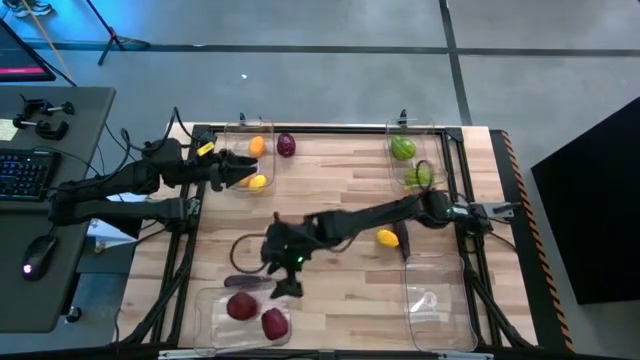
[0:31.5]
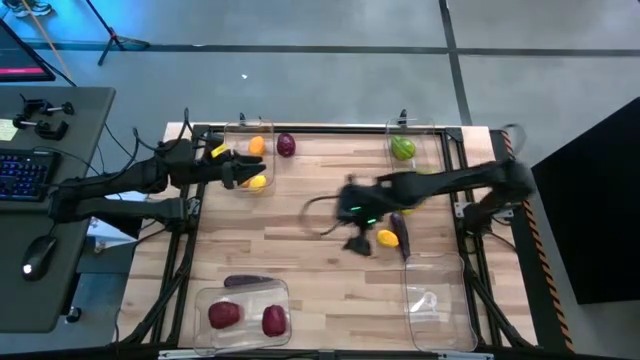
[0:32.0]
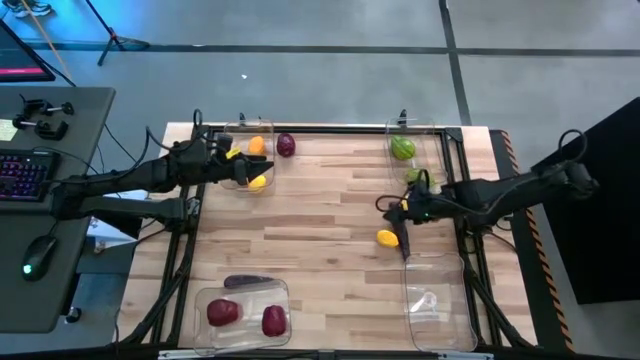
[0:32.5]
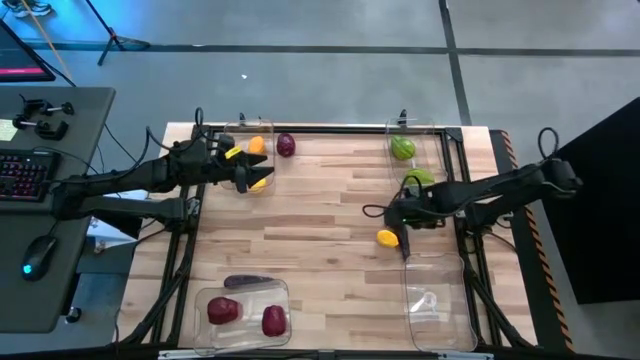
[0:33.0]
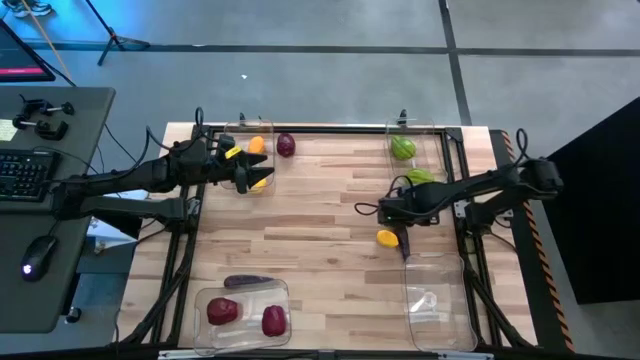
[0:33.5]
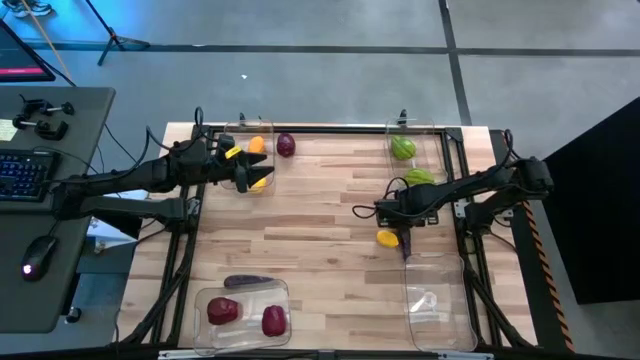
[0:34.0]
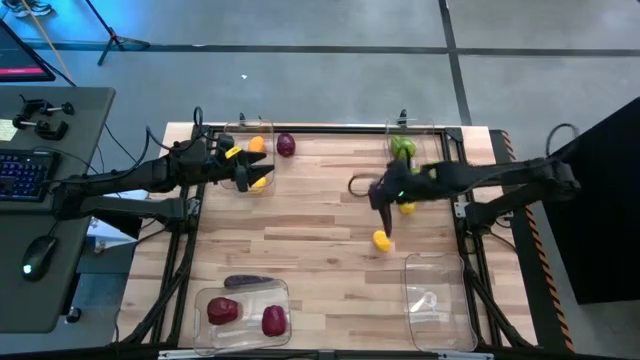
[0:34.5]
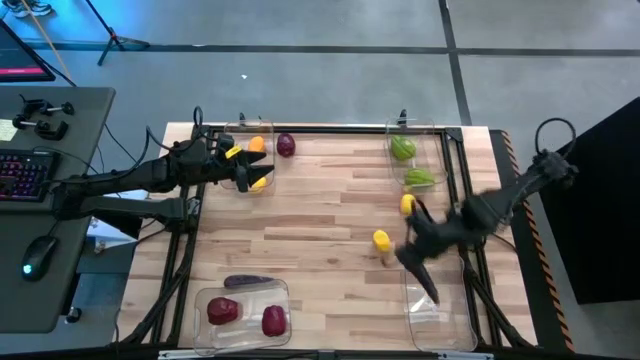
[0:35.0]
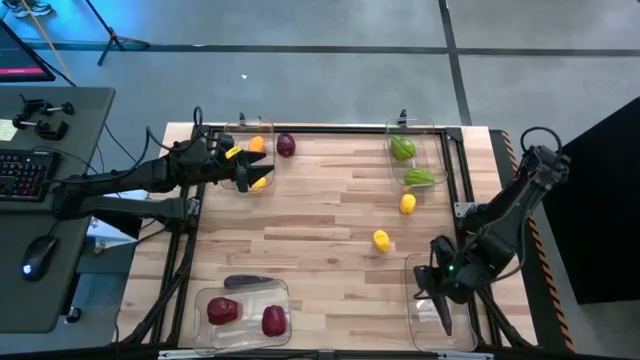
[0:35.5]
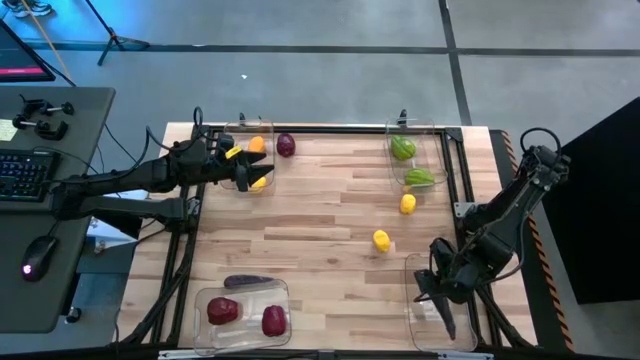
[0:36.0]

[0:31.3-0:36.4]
Task: Sort produce into baskets
Put the purple eggplant into the bottom right transparent bin

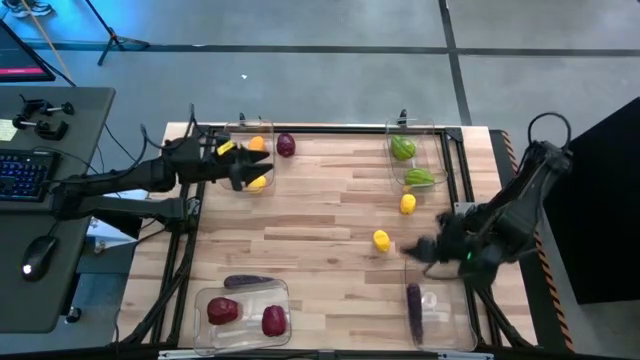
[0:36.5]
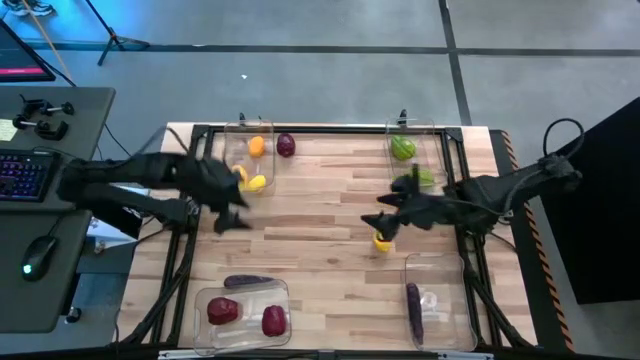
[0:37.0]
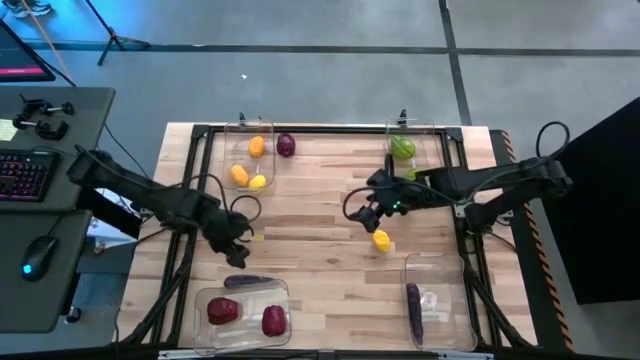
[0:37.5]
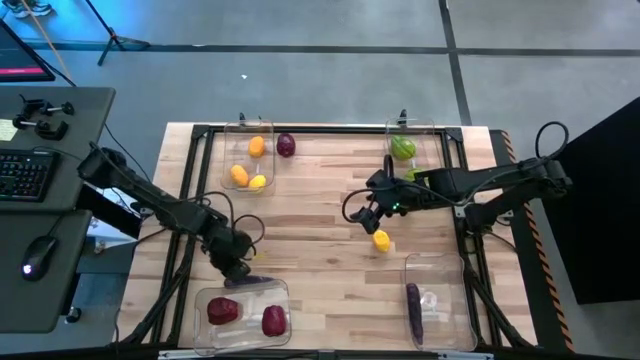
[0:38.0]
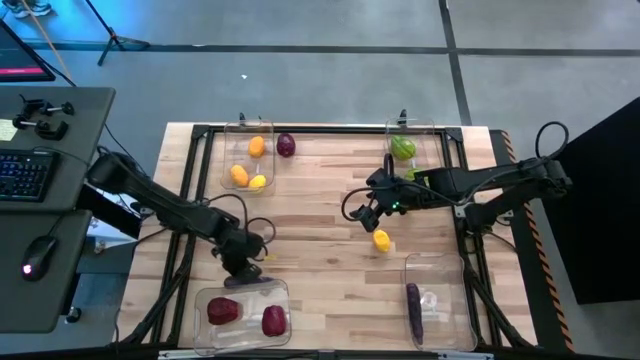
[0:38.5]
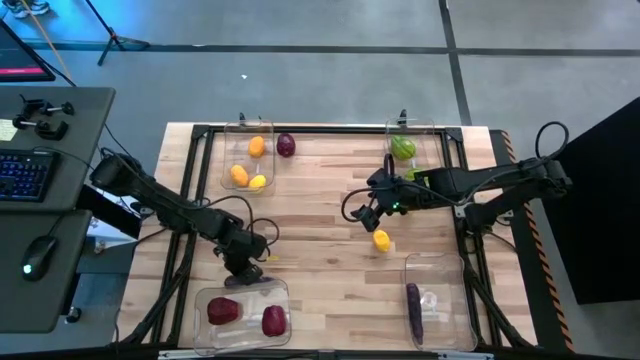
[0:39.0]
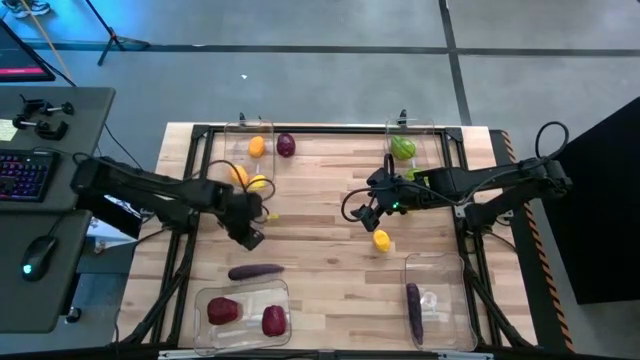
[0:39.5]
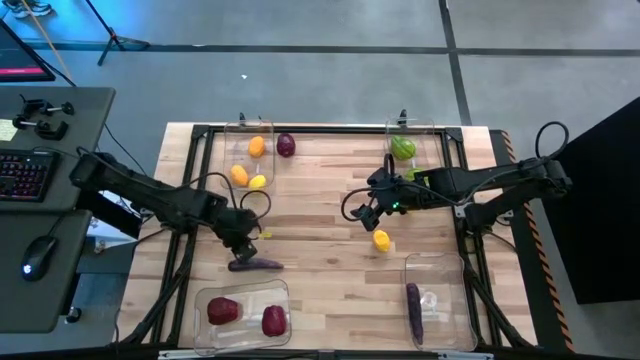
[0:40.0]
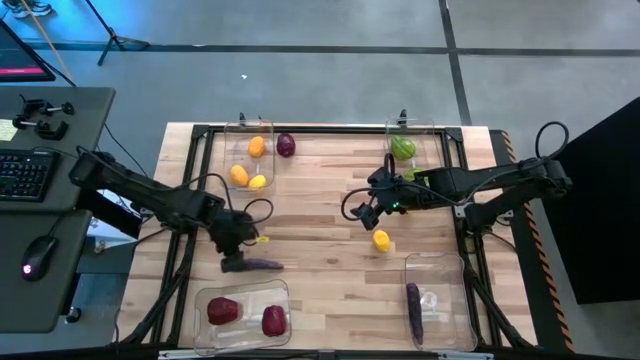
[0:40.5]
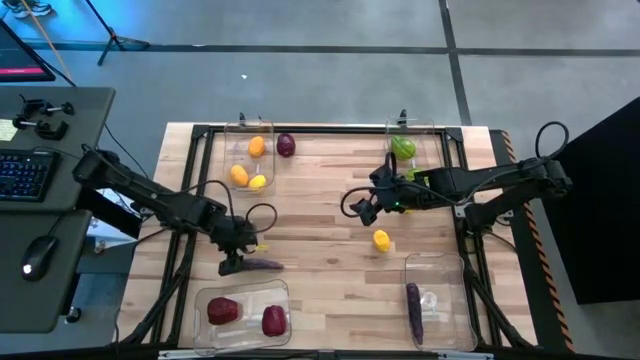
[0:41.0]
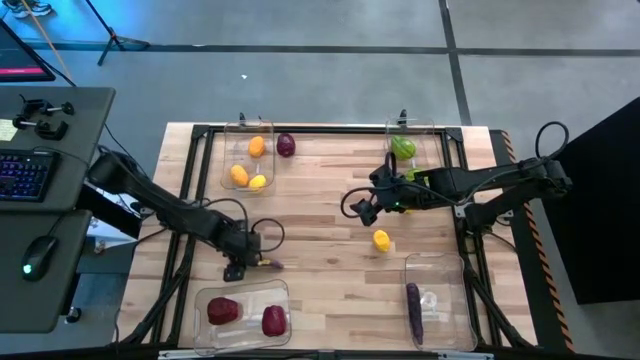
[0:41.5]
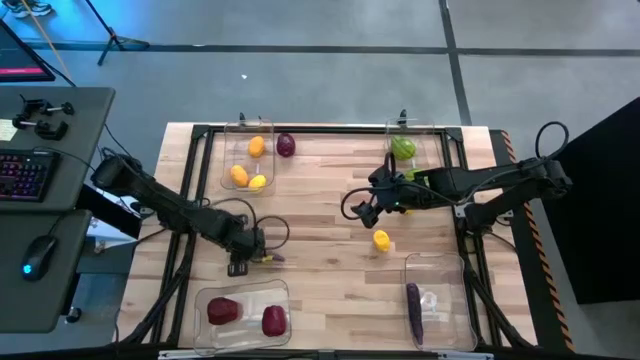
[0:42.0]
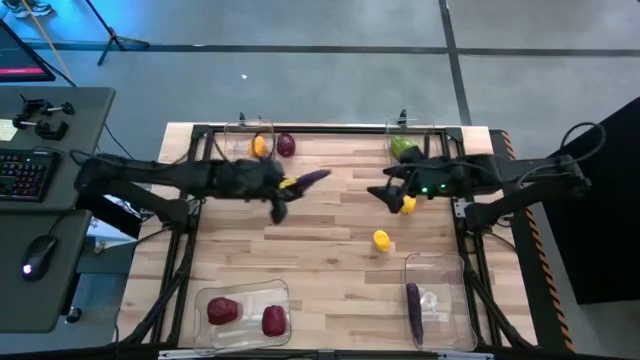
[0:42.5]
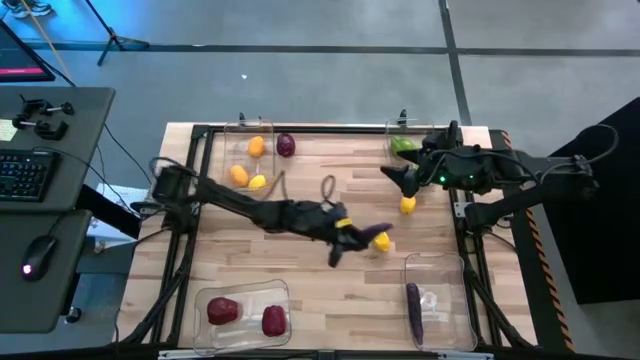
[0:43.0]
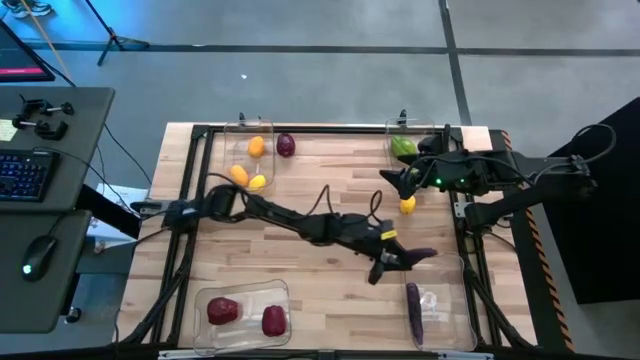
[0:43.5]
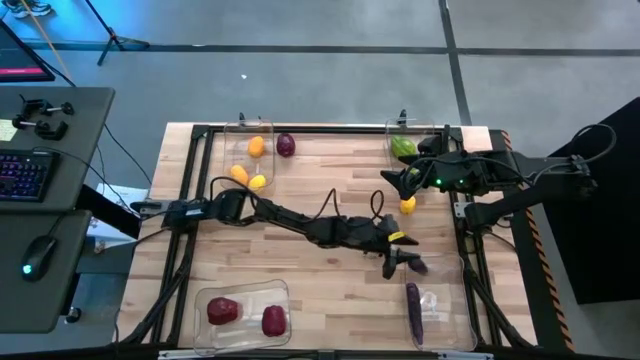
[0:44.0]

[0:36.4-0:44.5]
Put the purple eggplant into the bottom right transparent bin

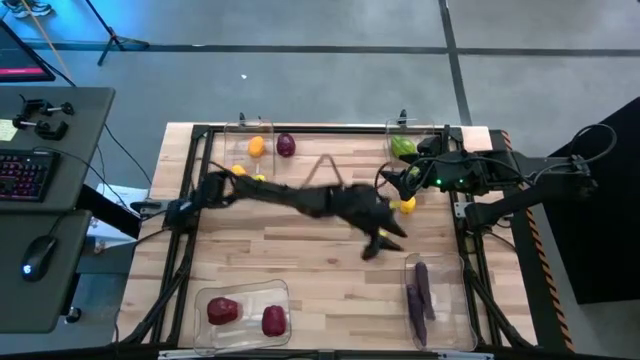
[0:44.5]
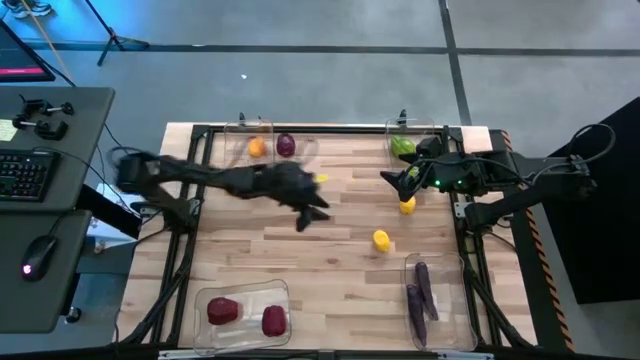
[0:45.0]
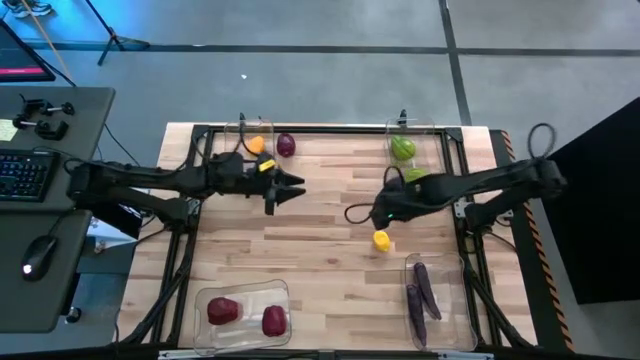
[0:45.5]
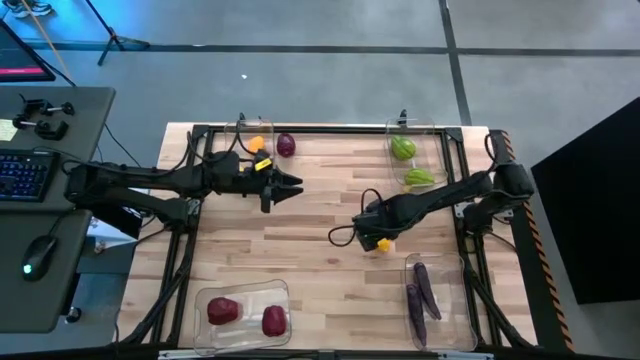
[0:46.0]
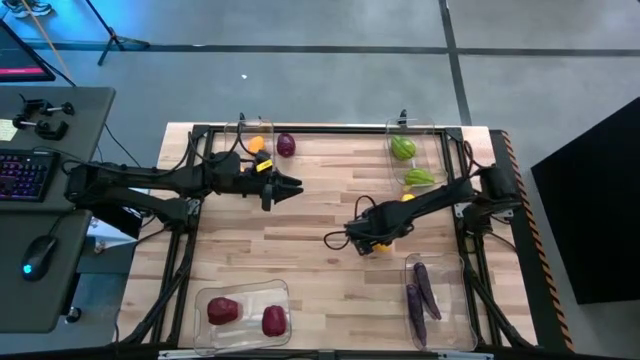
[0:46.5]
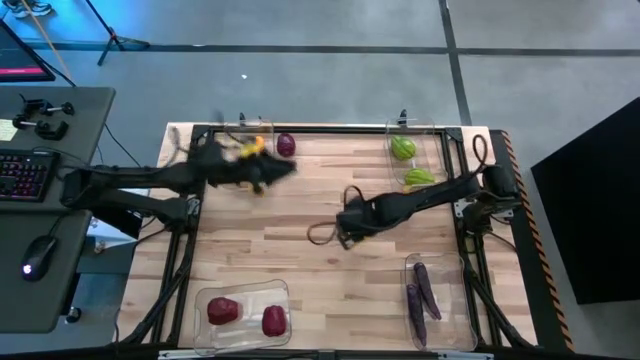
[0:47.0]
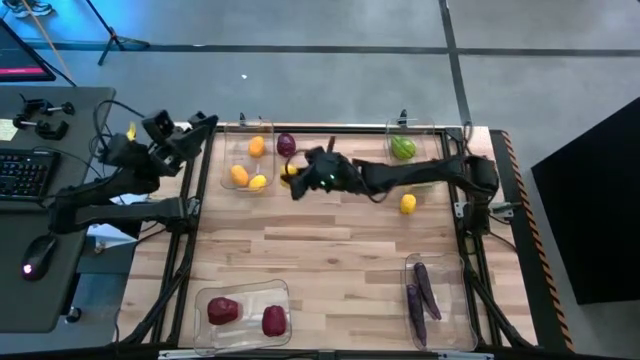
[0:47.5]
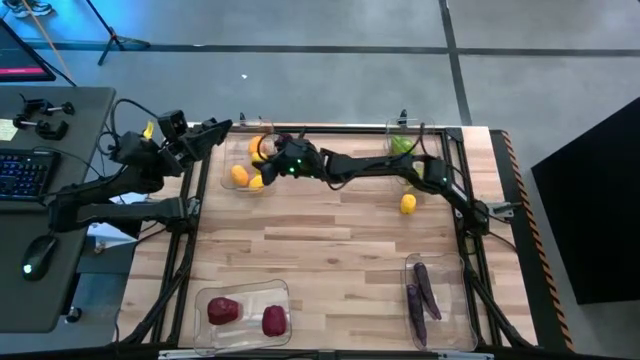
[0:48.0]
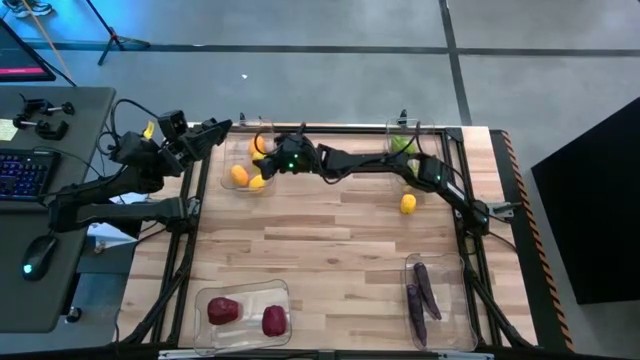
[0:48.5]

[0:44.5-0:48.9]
Put the yellow lemon into the top left transparent bin

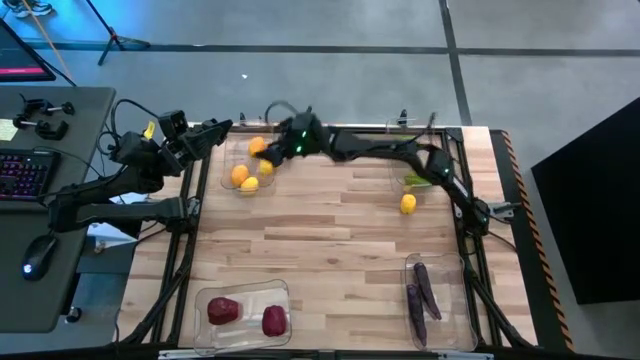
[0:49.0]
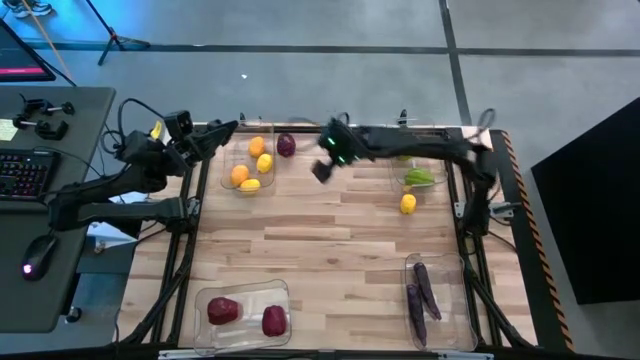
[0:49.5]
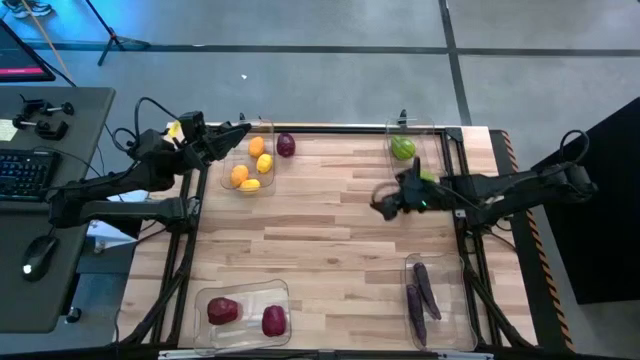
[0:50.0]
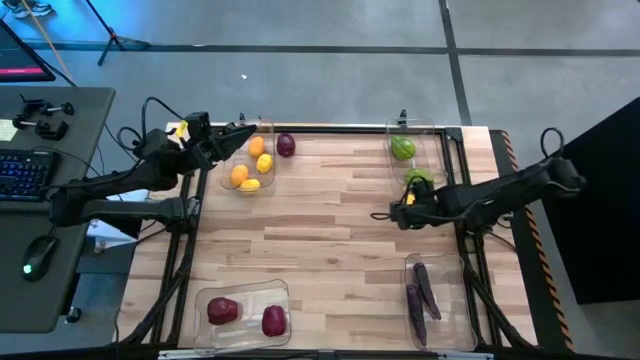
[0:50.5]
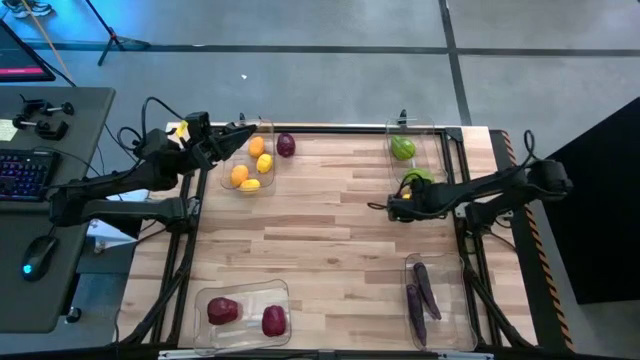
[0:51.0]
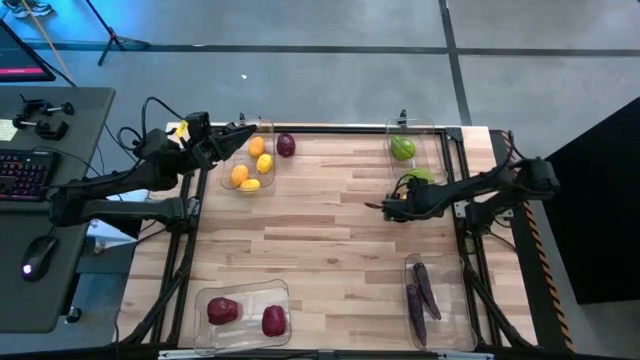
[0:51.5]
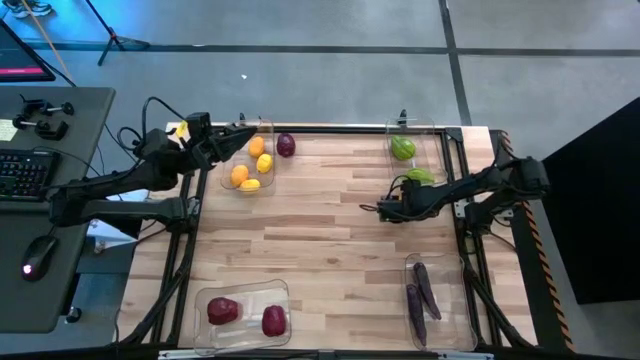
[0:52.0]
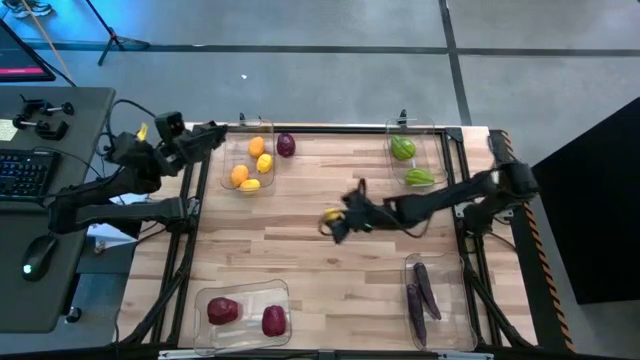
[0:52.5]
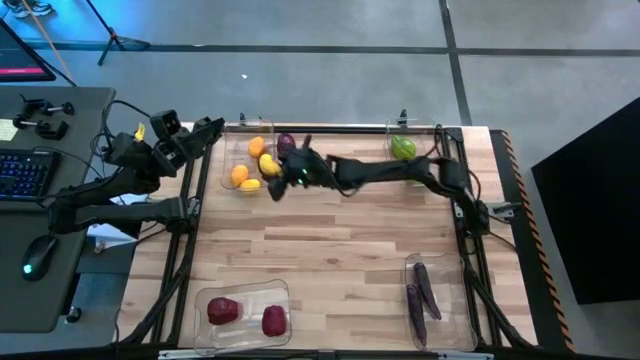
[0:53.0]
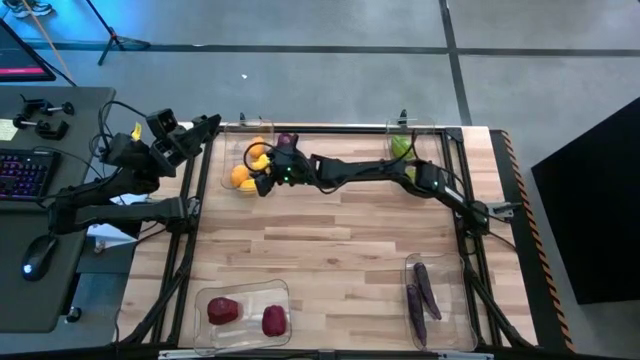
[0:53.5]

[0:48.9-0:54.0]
Put the yellow lemon into the top left transparent bin
